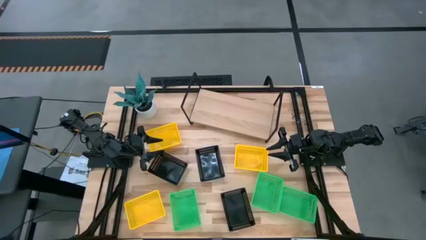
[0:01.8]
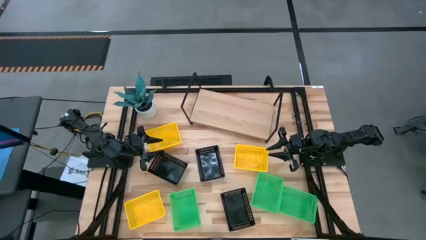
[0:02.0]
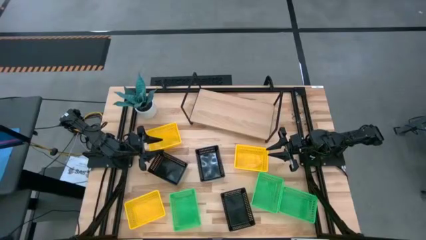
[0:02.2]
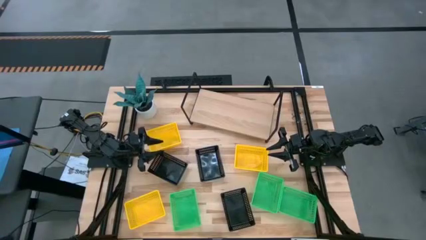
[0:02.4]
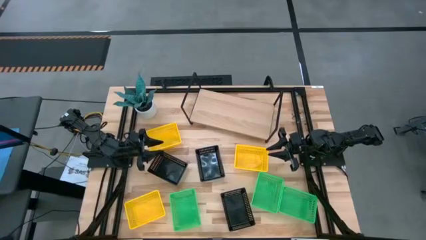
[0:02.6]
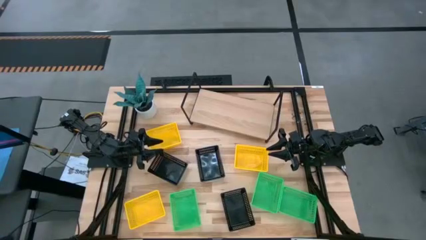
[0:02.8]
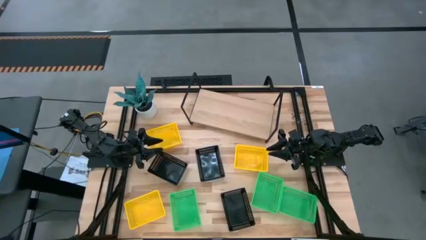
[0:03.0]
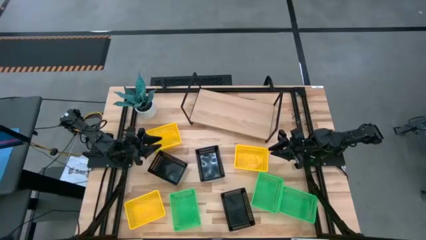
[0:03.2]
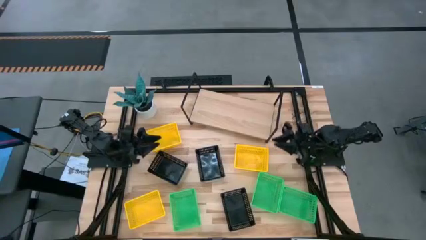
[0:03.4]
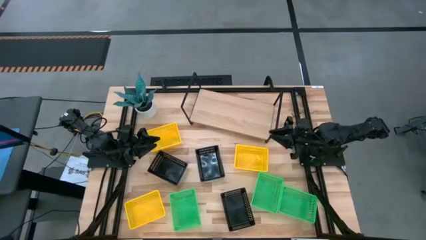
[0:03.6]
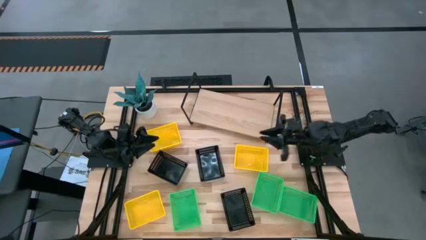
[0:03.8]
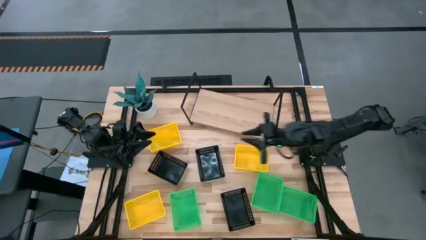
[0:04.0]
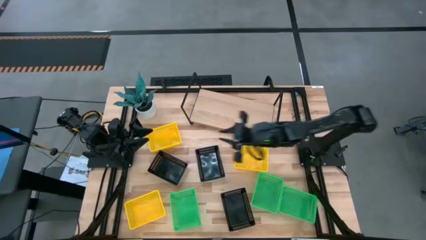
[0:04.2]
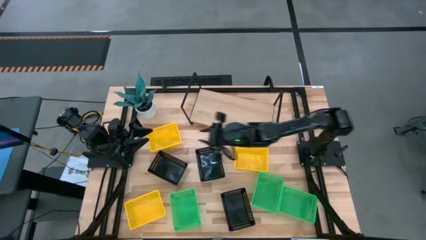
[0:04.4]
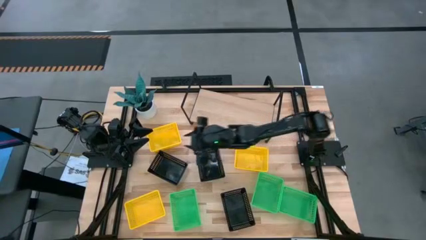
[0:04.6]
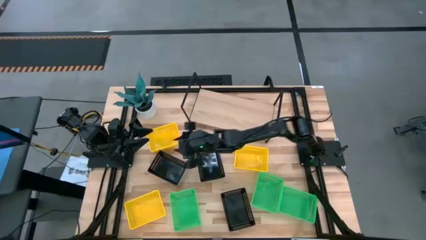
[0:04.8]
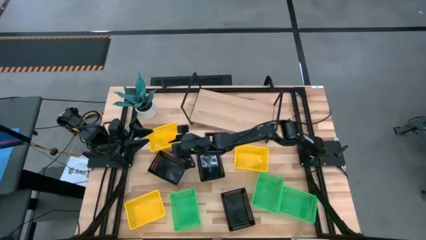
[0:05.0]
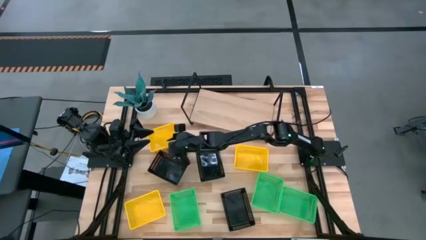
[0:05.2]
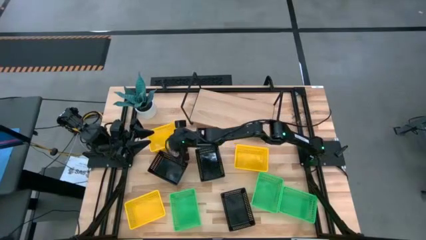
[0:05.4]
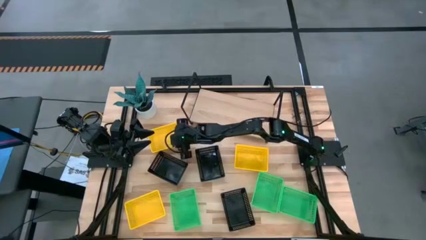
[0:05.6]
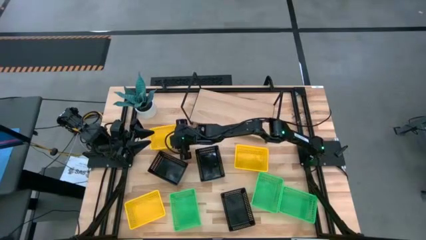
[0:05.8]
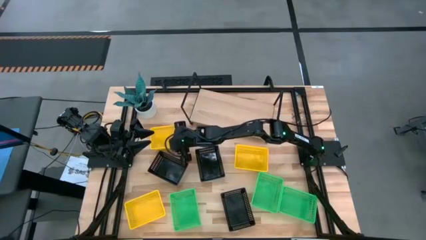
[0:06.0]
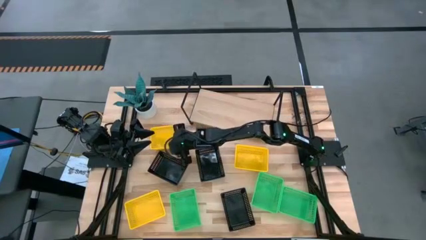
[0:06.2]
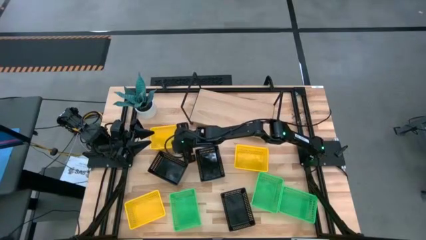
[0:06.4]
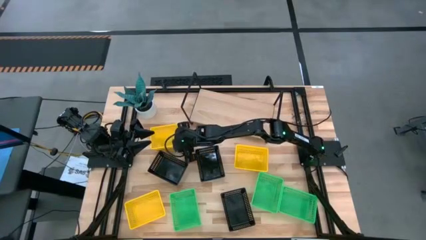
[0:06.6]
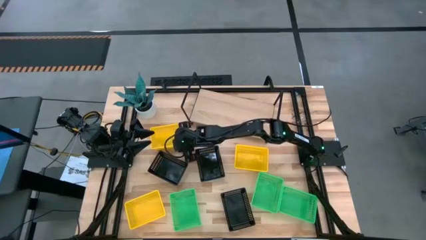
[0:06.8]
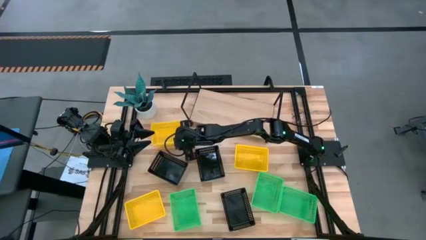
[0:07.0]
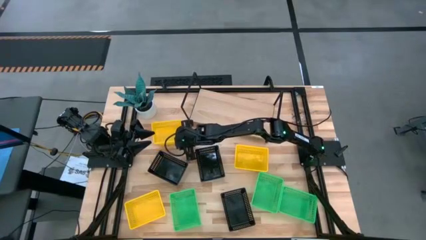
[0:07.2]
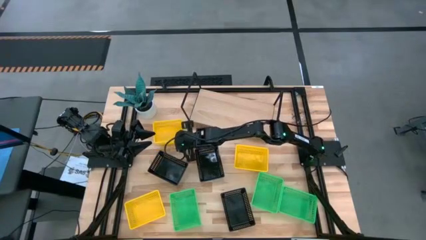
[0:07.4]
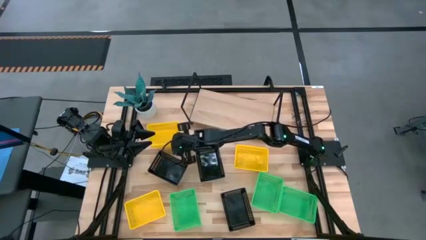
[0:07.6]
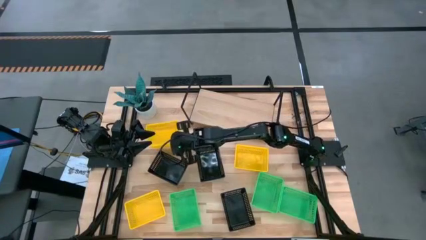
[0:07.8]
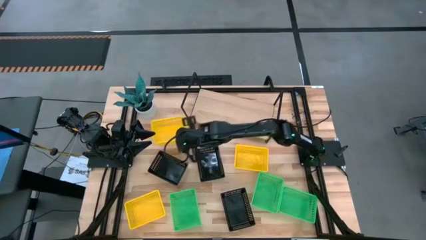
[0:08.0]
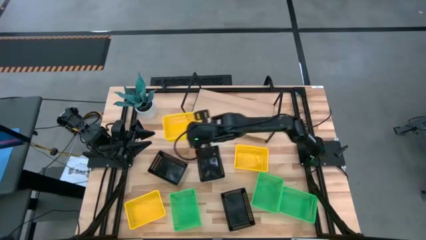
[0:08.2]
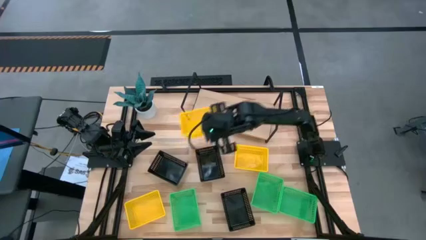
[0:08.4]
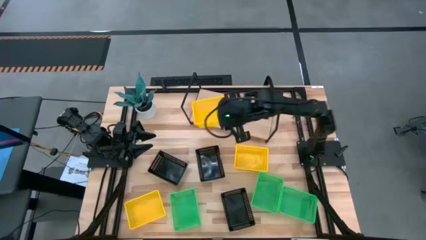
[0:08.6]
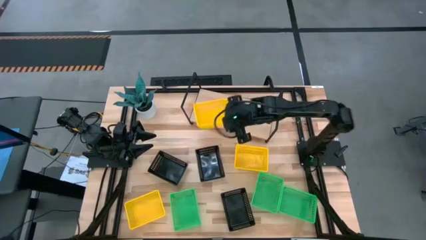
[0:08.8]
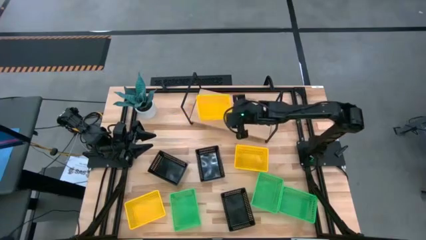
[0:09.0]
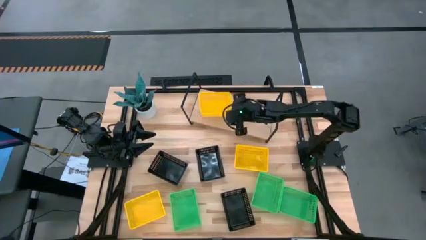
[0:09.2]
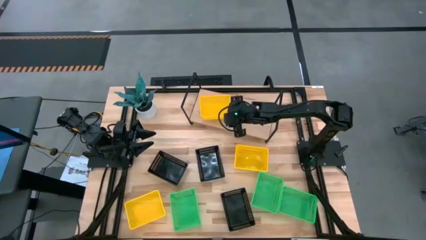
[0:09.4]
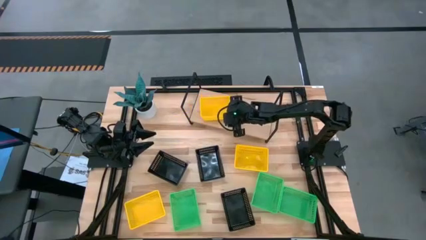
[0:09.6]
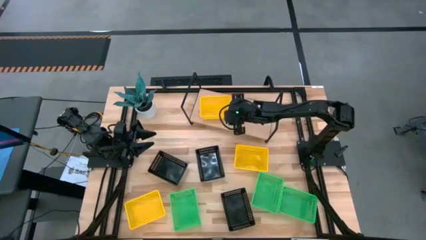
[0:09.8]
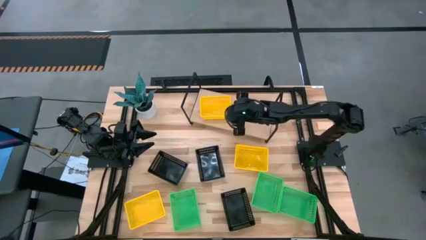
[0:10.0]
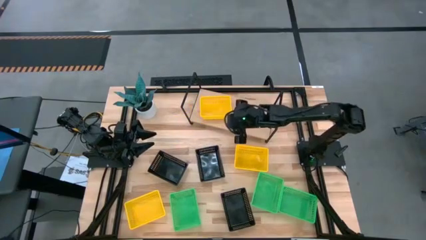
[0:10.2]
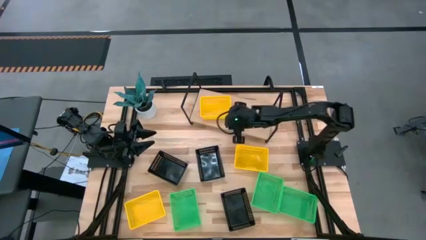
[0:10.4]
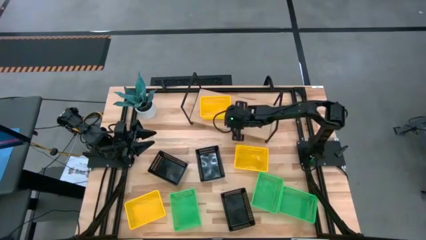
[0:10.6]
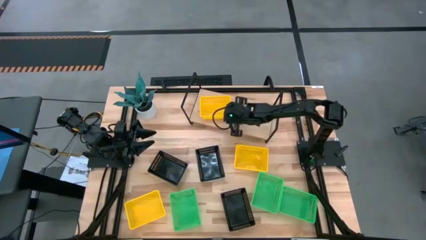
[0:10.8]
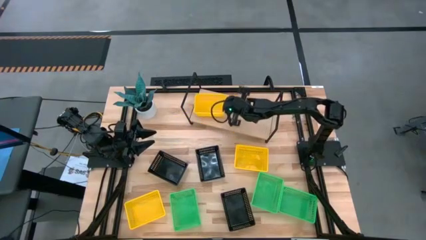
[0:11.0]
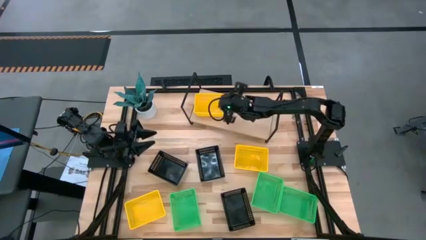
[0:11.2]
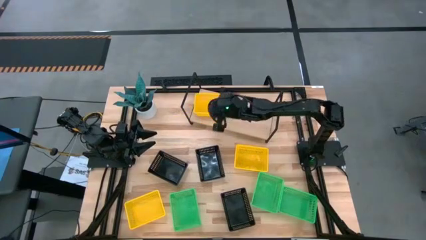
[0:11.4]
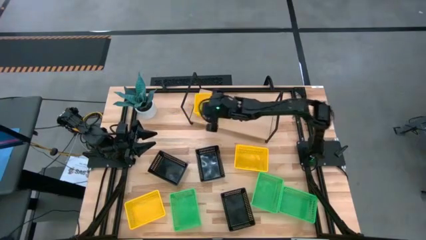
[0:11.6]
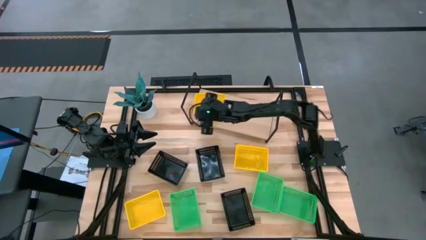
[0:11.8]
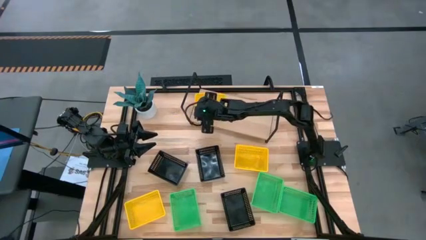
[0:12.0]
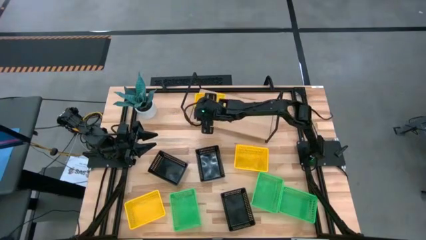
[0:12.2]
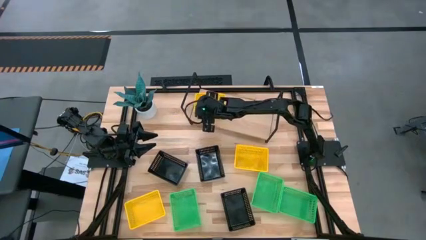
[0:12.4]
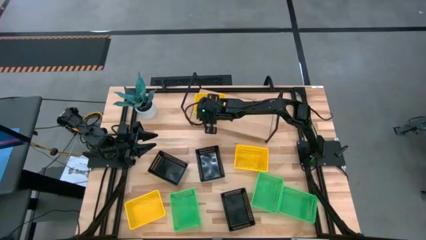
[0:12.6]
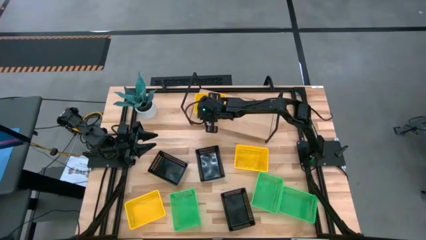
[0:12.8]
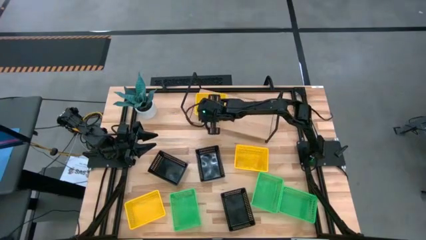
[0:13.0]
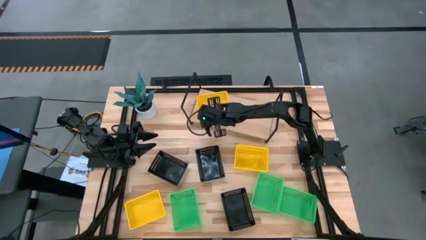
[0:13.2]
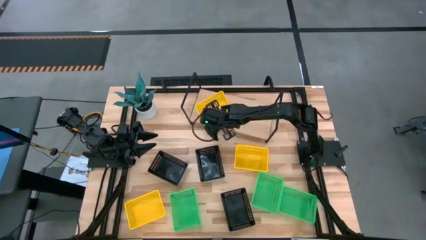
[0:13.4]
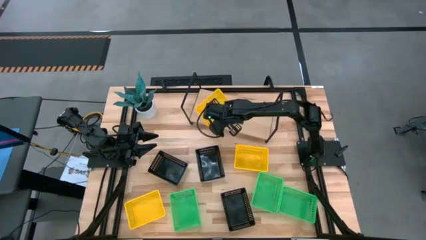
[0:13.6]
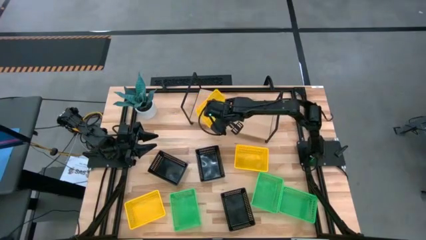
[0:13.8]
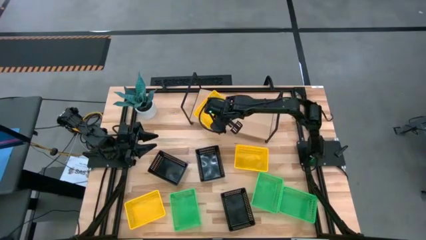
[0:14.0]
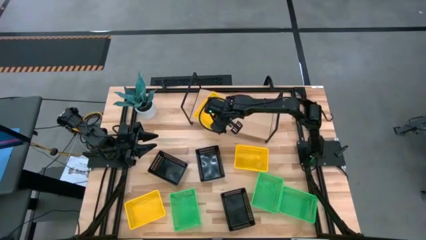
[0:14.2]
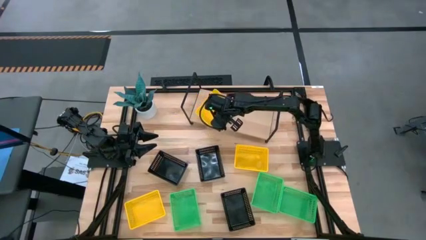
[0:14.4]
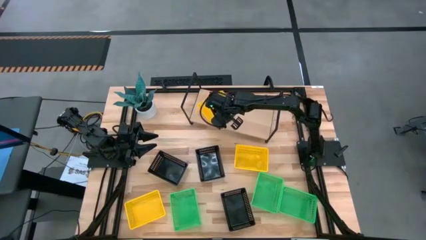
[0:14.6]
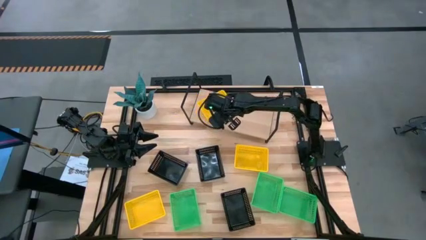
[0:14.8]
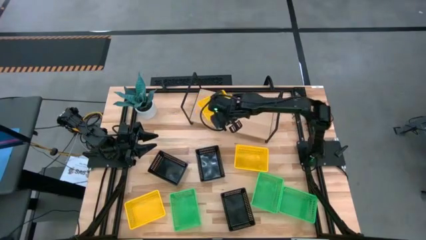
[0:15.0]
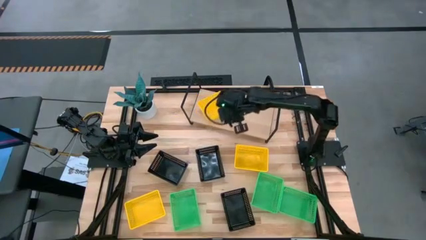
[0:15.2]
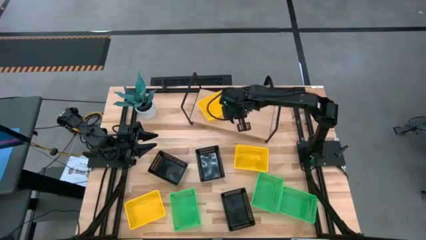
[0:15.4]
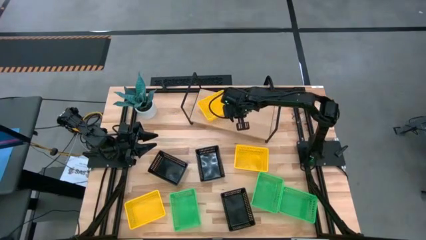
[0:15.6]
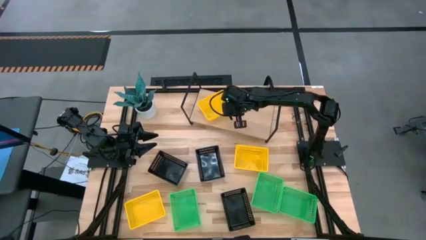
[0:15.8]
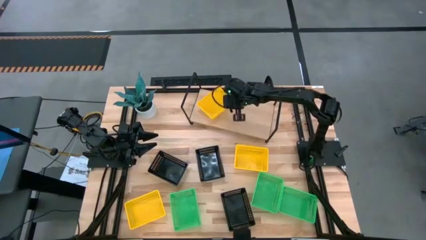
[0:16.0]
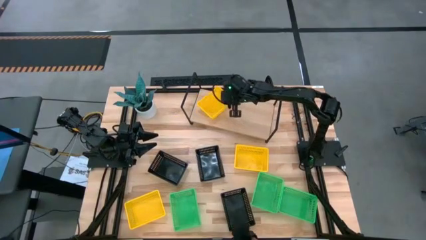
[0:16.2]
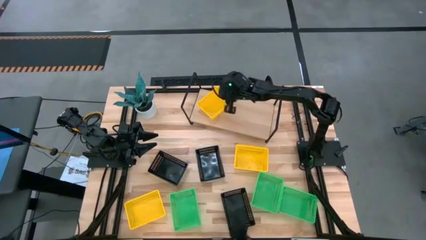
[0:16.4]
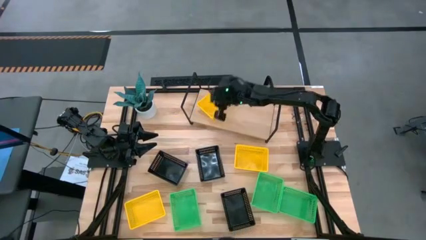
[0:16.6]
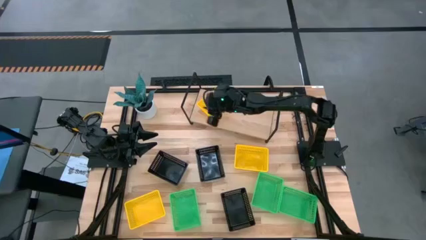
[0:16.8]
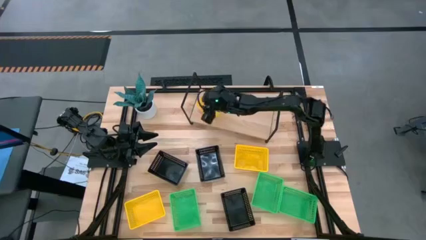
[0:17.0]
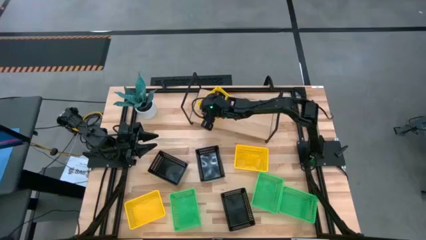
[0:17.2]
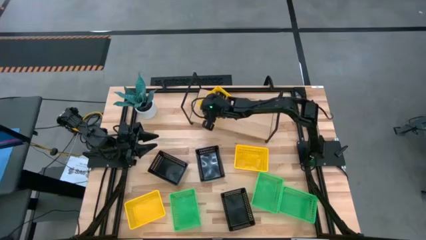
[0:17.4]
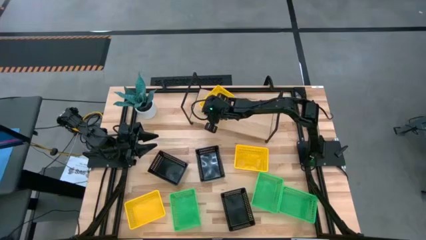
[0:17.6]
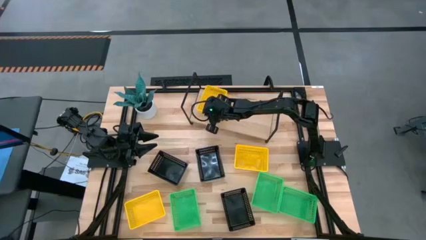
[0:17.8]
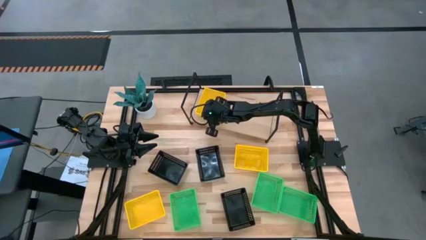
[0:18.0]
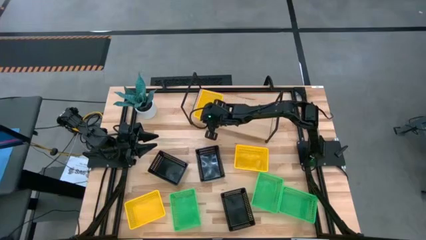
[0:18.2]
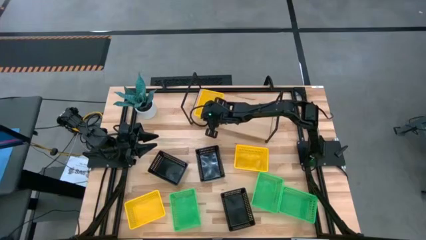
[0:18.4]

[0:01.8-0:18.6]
Task: Stack baskets on shelf by color
Put the left yellow bin into the shelf
